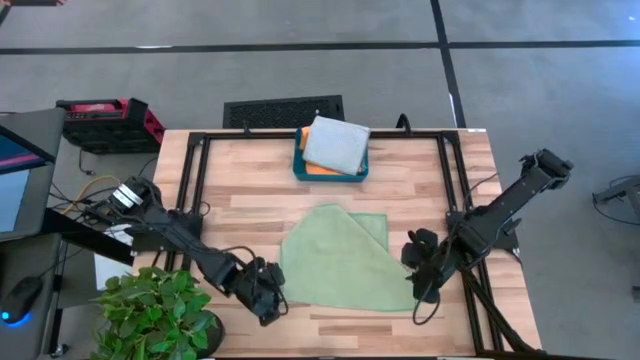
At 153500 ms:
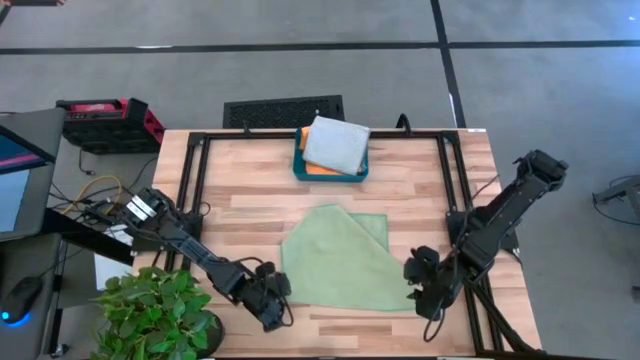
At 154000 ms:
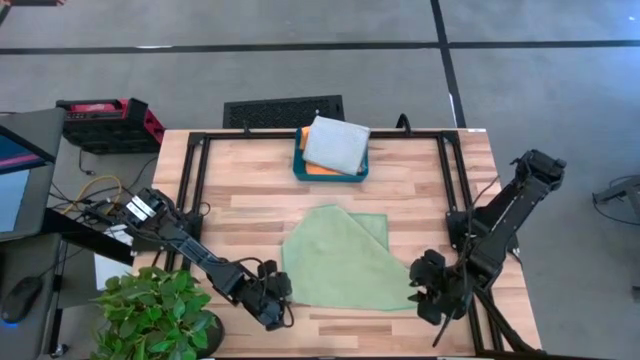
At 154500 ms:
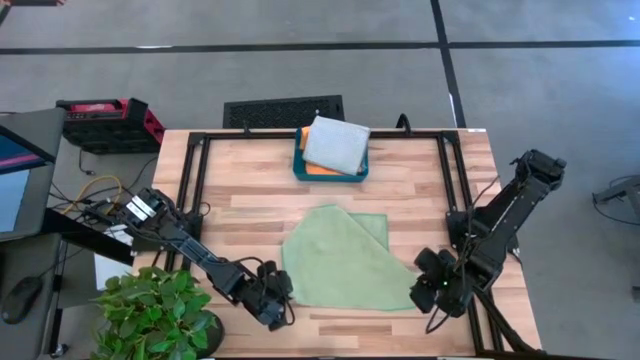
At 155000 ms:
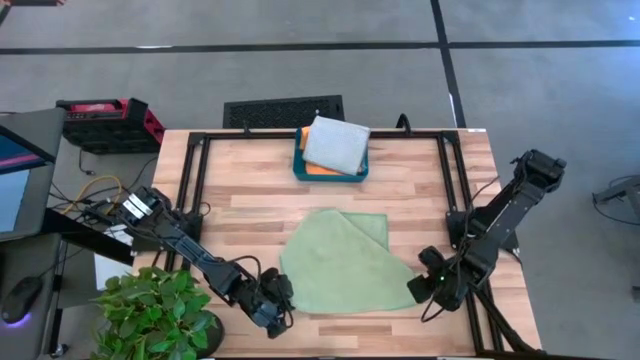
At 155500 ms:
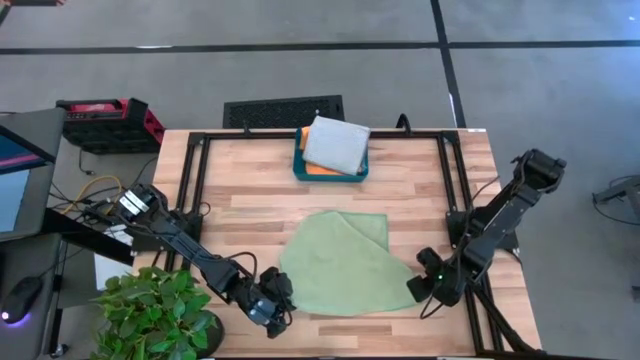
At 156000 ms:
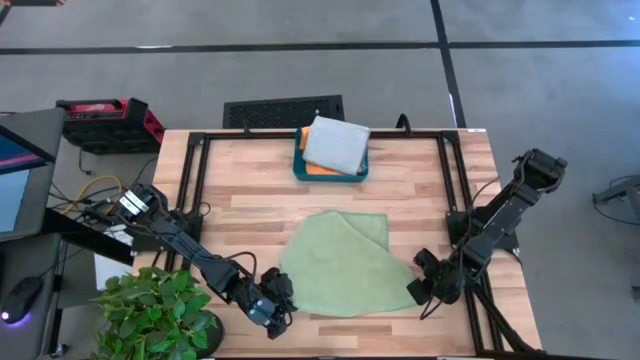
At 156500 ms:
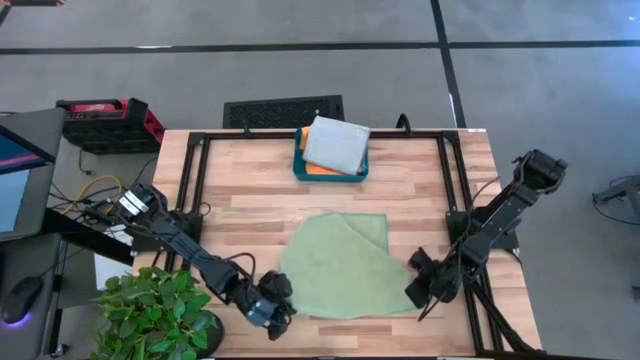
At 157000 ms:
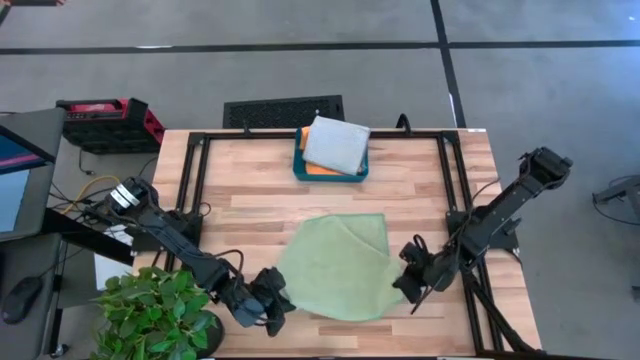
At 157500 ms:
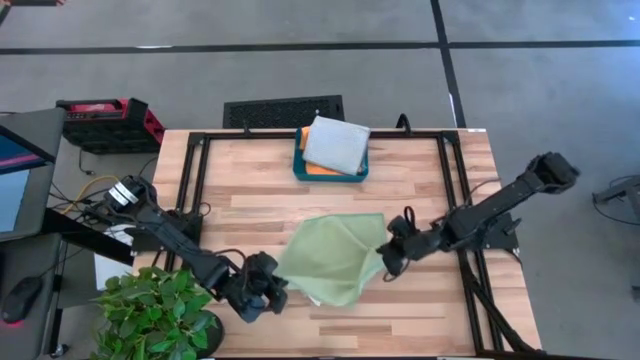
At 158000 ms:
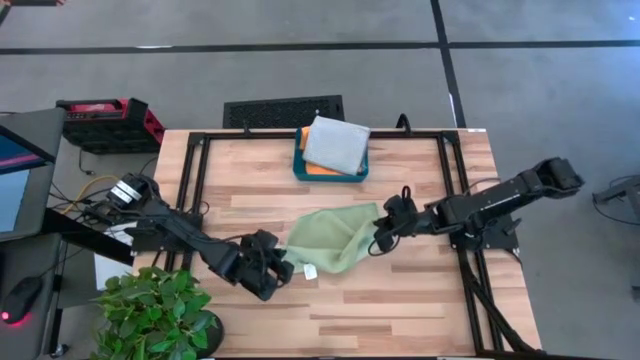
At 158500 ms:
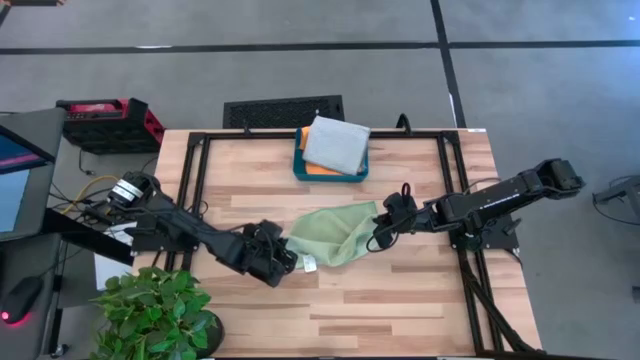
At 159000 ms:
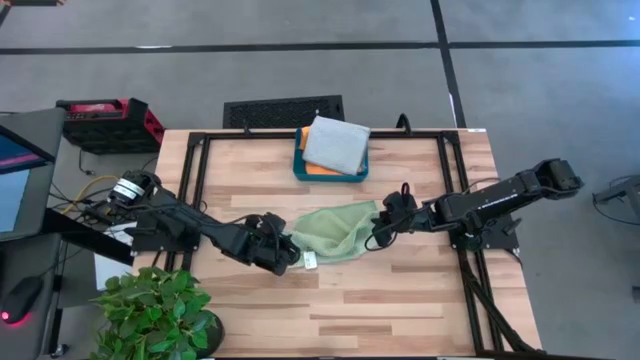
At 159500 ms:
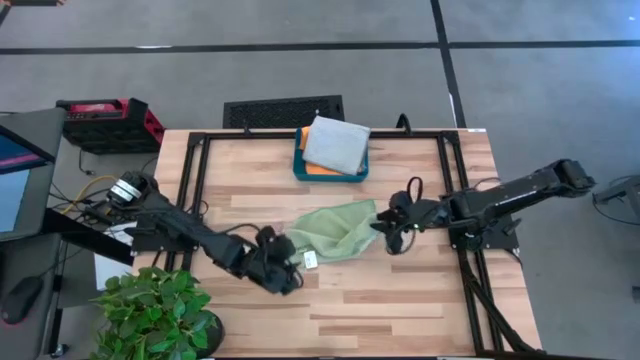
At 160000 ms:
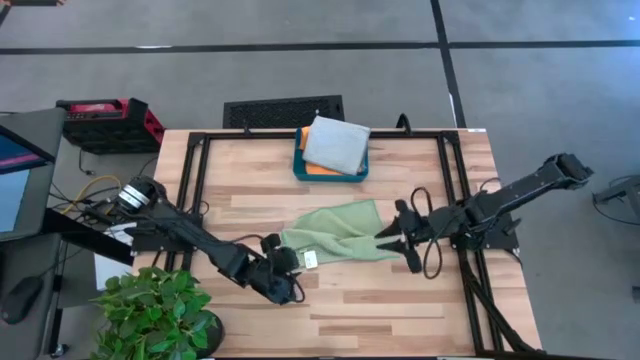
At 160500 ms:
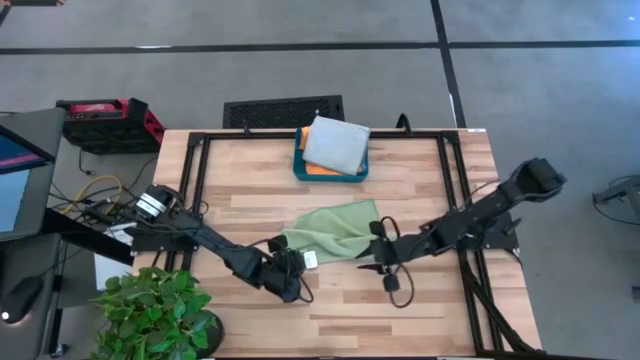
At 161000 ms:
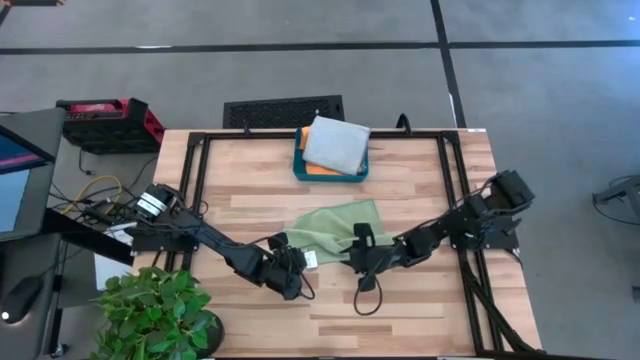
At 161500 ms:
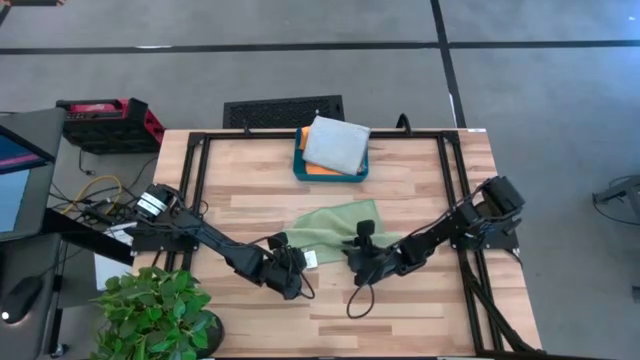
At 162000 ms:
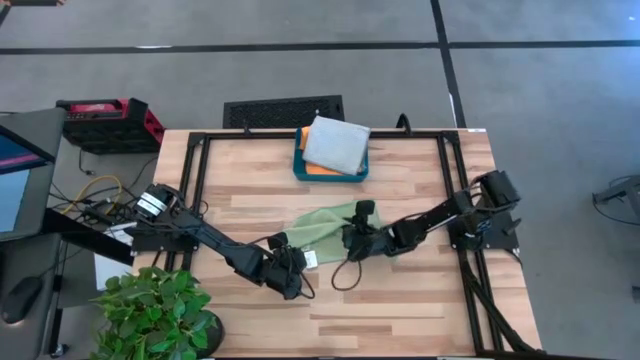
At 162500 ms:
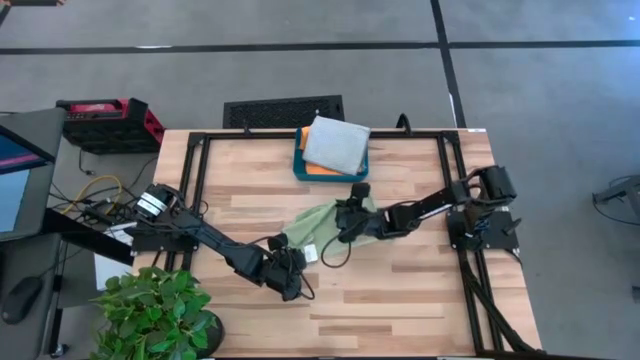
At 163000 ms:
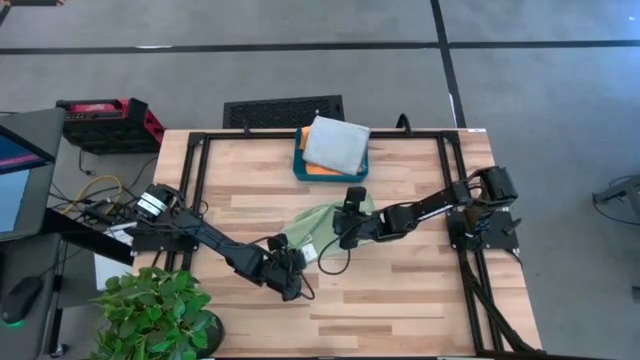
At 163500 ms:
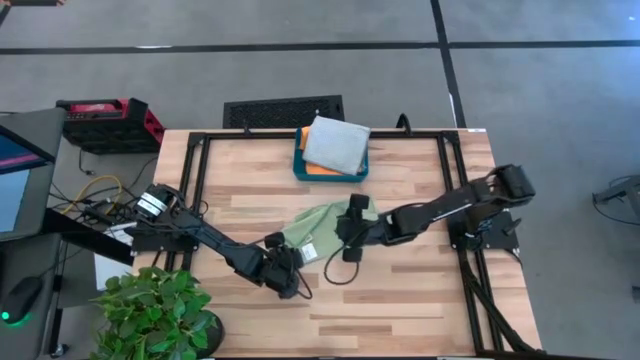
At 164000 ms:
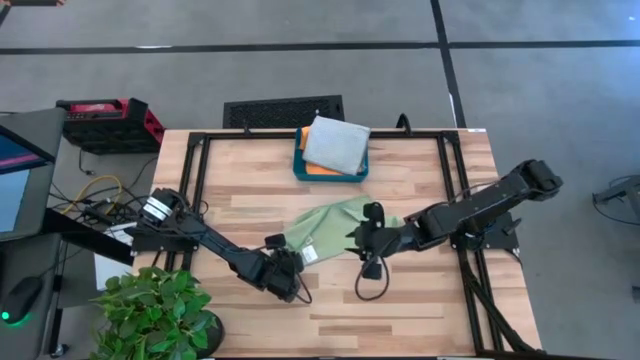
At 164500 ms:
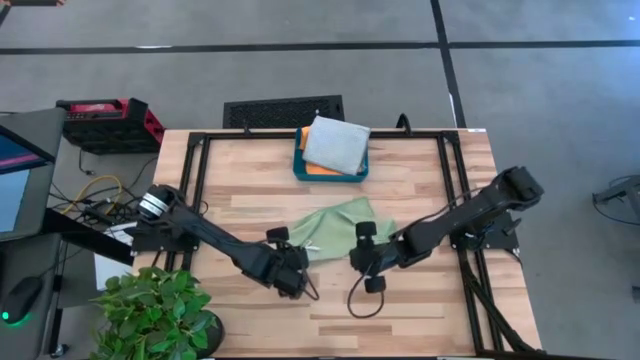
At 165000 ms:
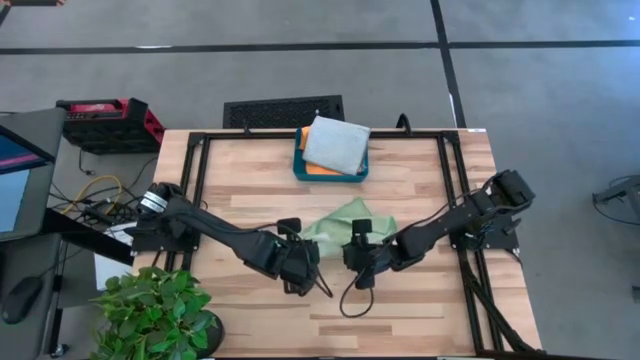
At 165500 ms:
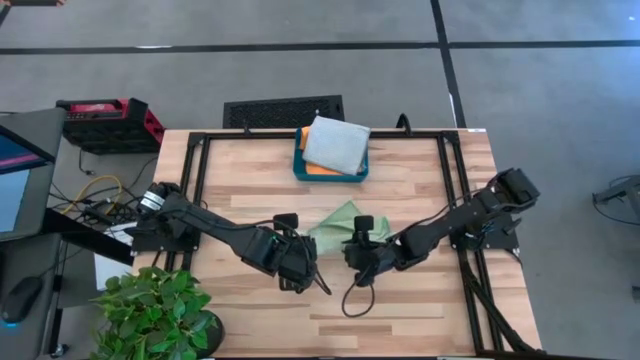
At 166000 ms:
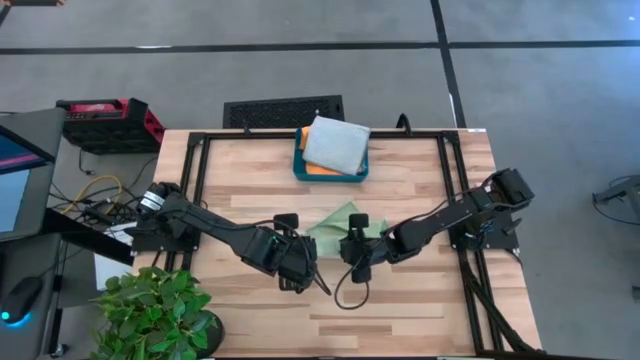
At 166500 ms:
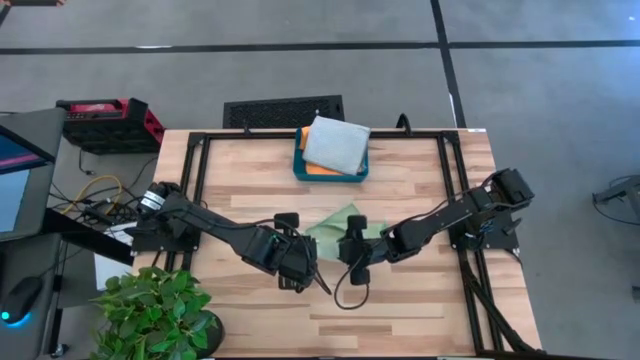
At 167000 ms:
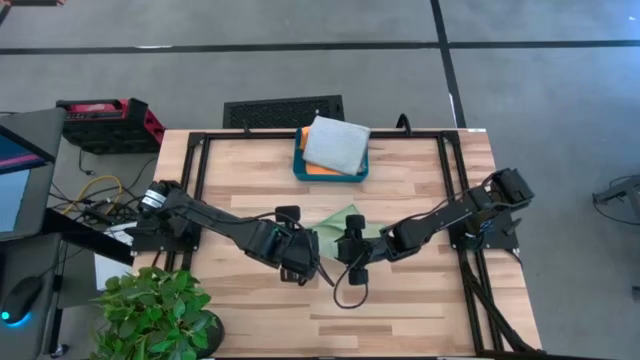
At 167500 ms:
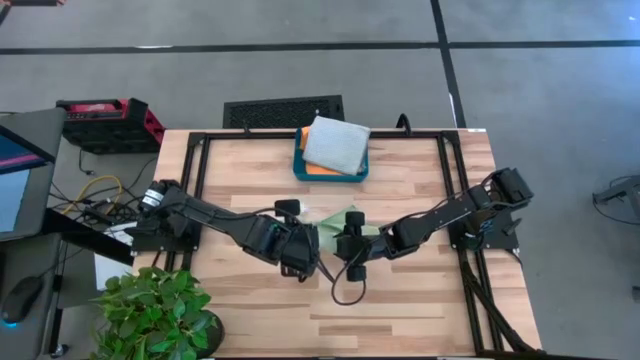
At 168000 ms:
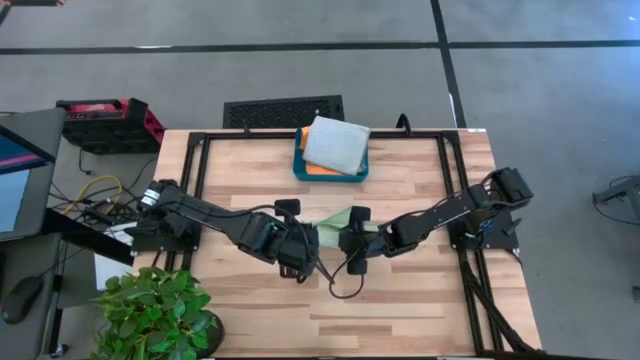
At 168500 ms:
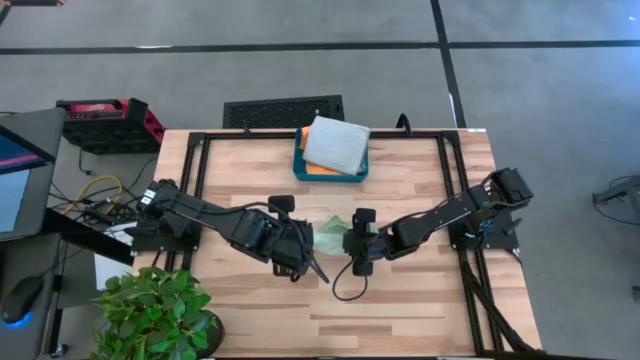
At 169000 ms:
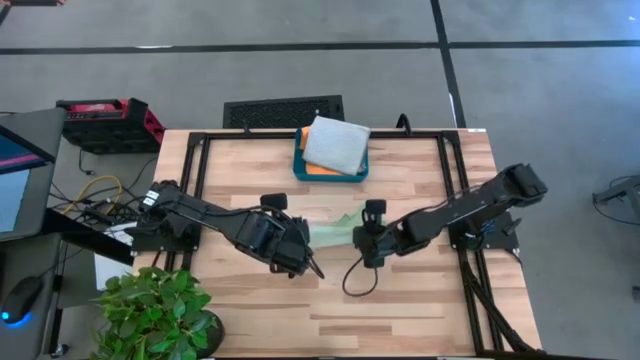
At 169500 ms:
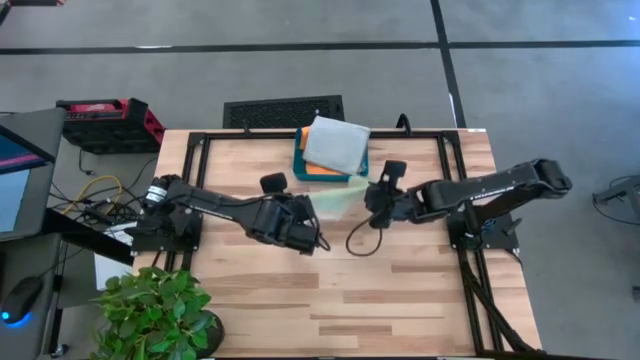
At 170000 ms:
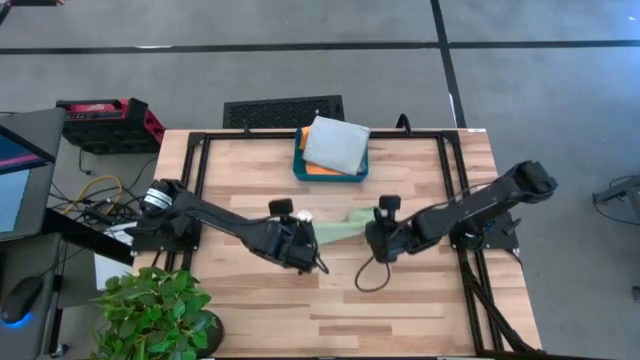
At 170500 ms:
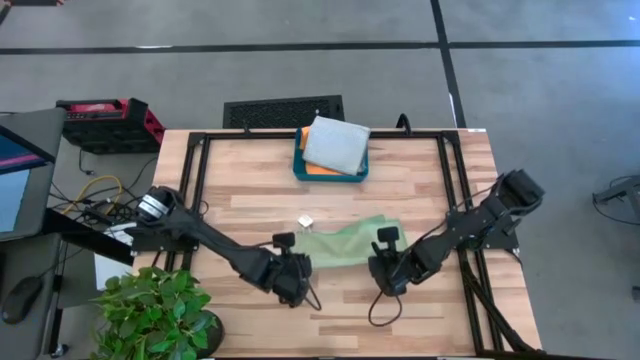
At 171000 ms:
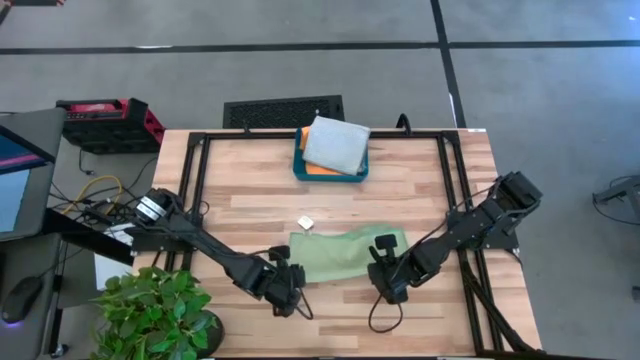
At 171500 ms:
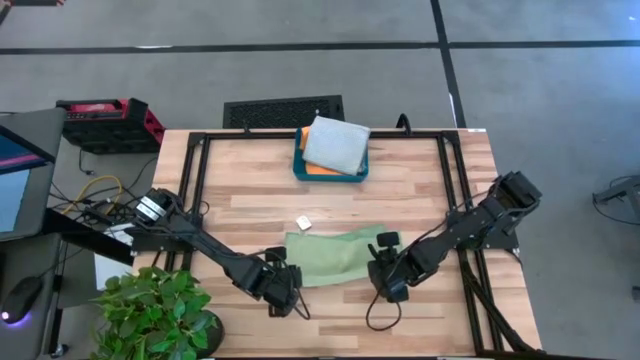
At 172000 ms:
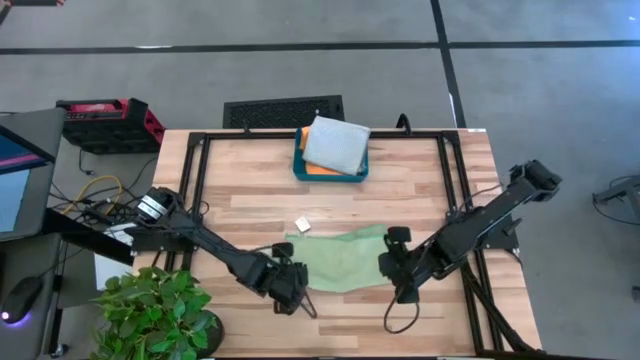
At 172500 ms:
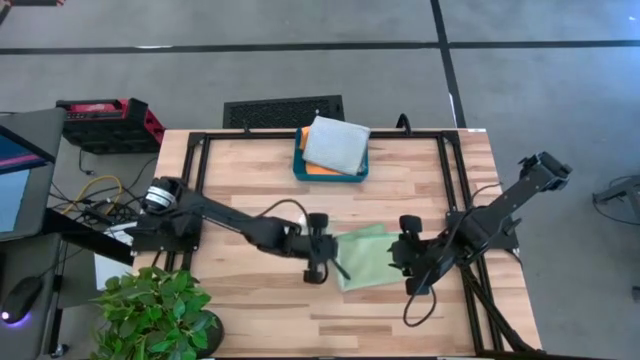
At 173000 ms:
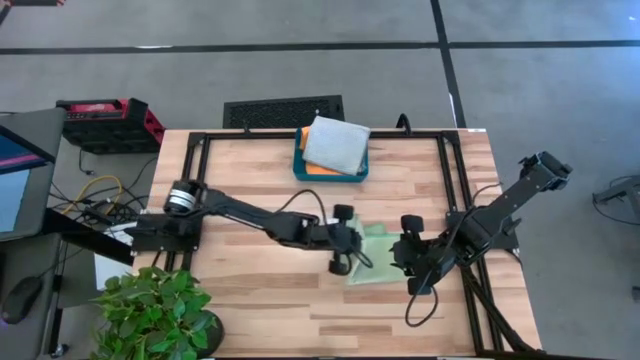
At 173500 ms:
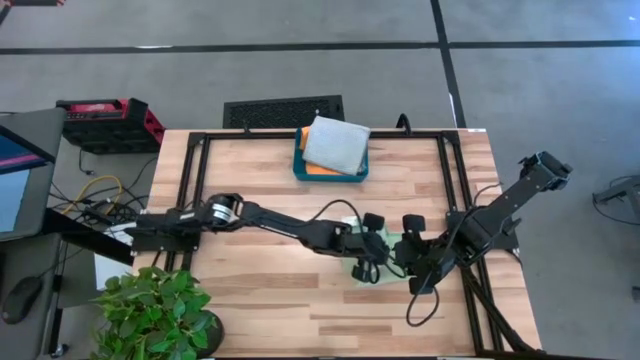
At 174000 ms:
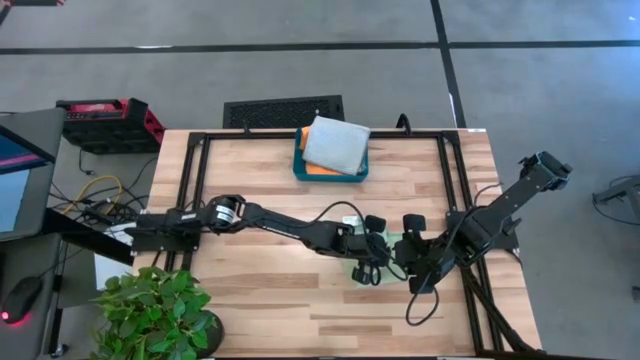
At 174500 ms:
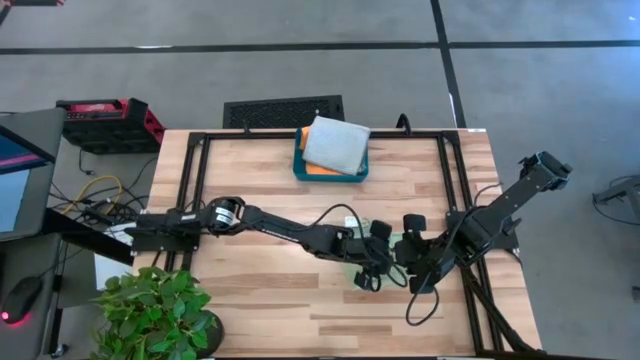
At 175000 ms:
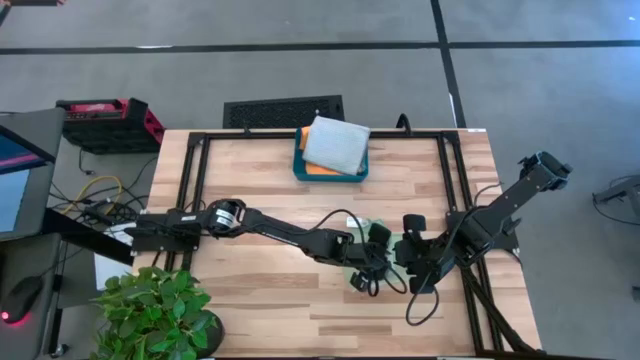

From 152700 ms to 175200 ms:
Task: Fold microfiber towels
Fold the green towel
